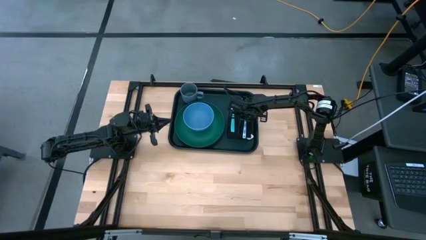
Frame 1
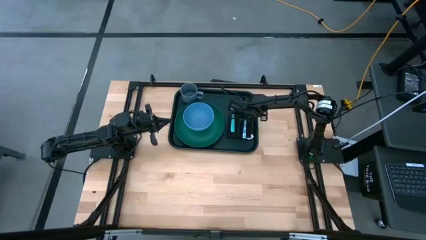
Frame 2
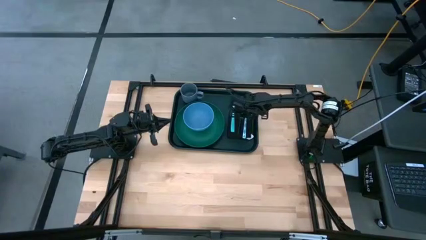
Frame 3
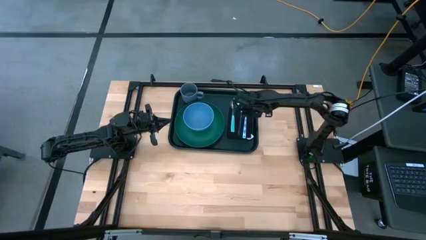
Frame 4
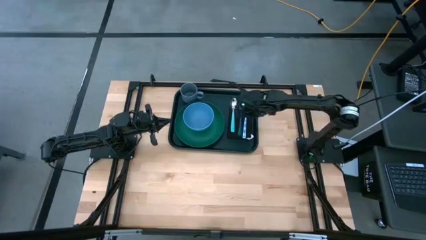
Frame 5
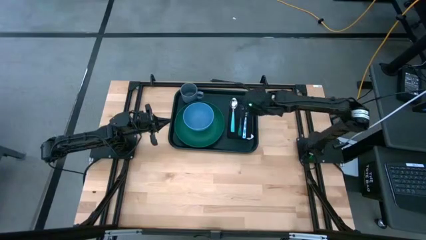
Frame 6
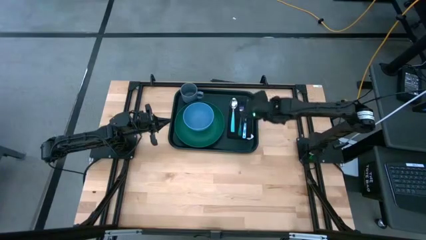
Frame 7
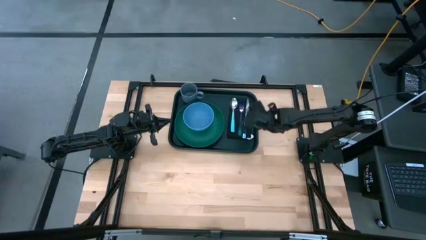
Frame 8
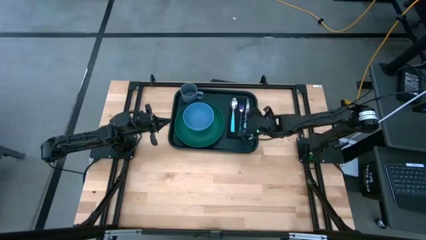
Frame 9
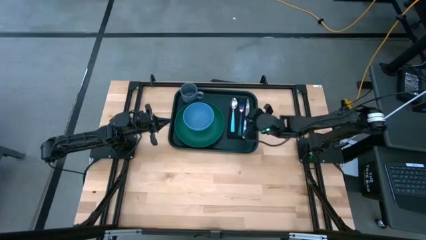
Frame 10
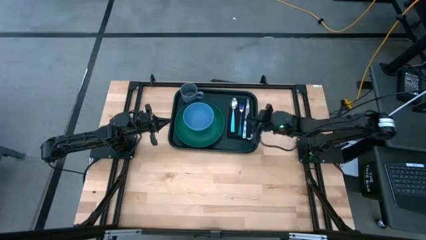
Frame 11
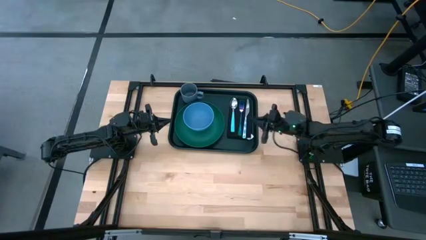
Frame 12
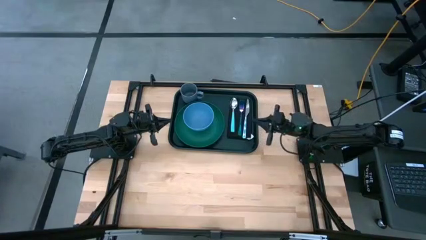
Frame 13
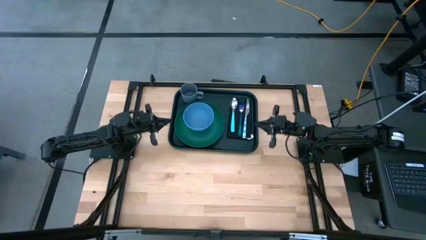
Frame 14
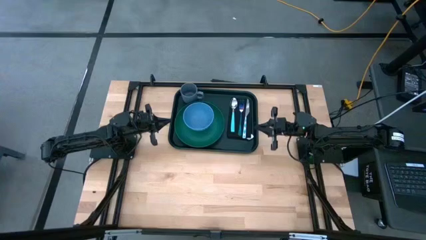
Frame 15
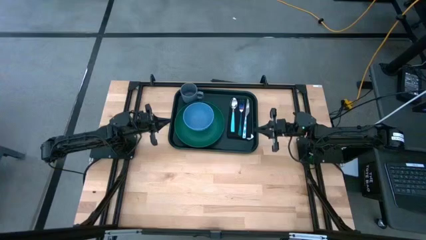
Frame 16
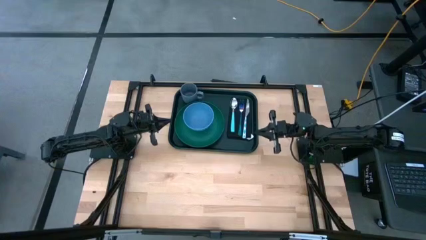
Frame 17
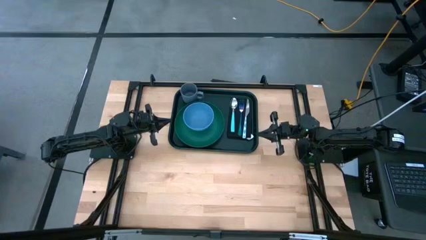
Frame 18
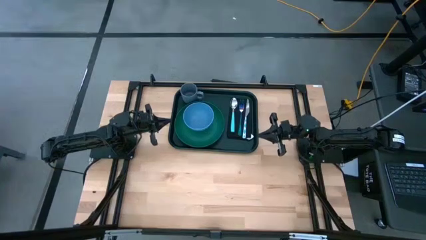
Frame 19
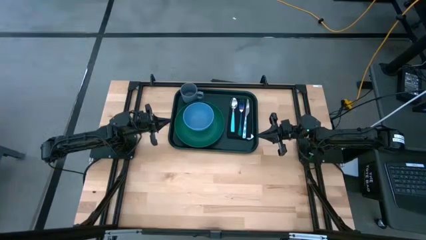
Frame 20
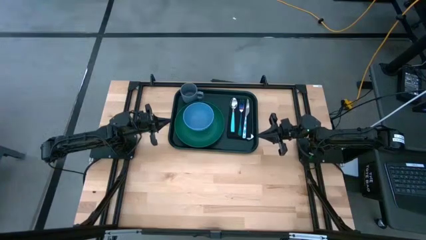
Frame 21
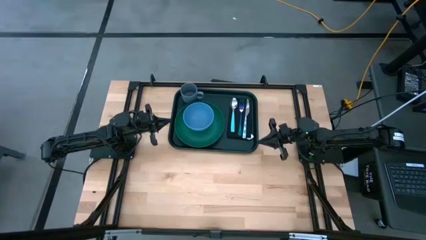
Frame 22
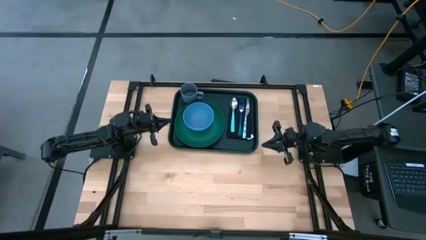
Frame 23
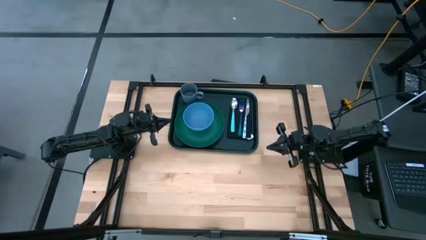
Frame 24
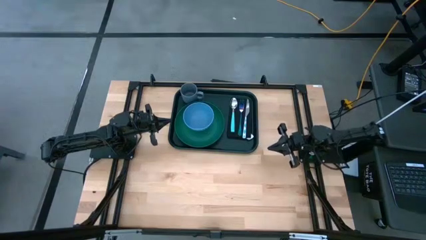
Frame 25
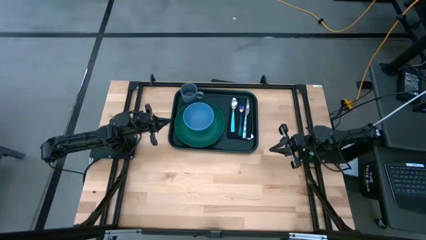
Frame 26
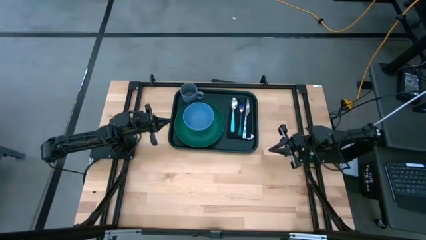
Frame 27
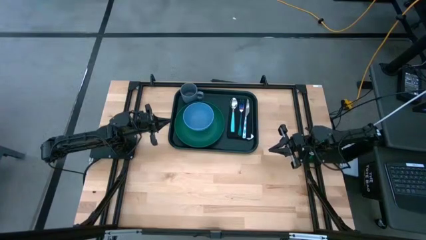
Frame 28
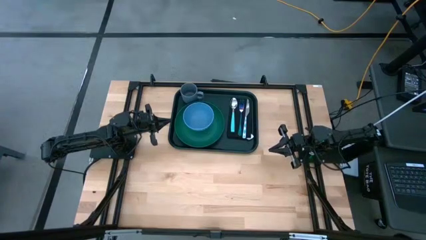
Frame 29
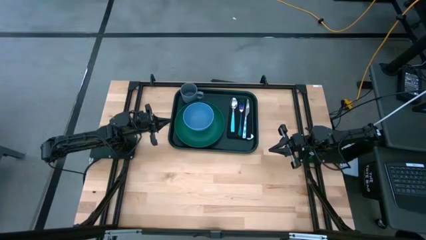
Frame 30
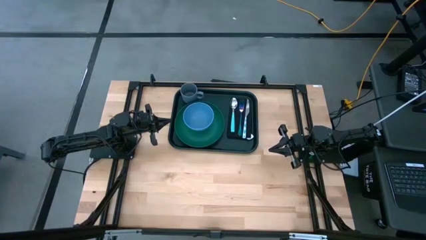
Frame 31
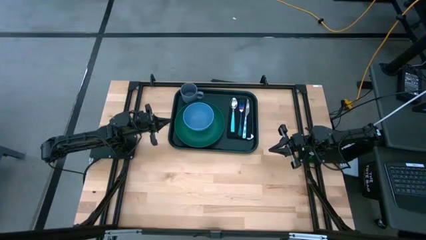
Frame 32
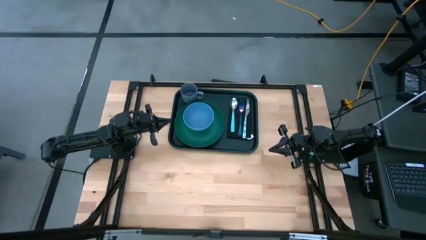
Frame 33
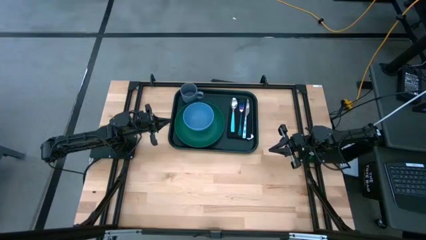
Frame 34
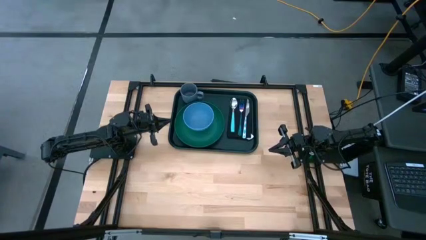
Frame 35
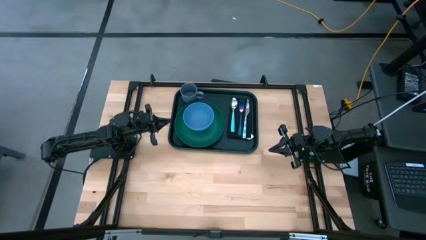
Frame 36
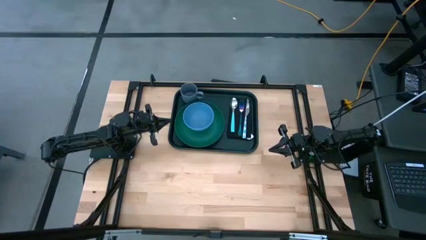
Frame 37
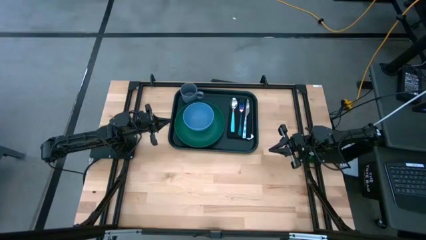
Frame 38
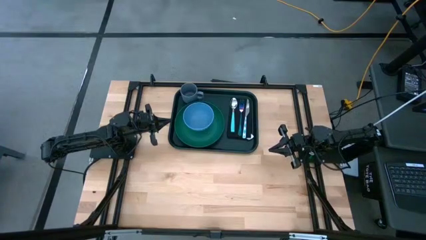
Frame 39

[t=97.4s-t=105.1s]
Task: Set up tray
Return to Home Position

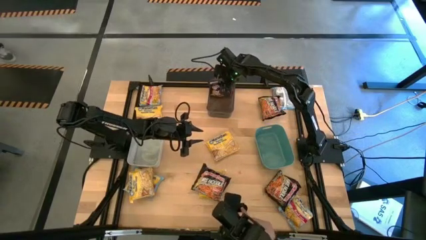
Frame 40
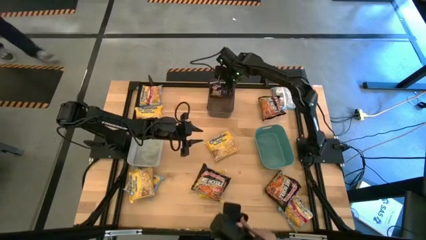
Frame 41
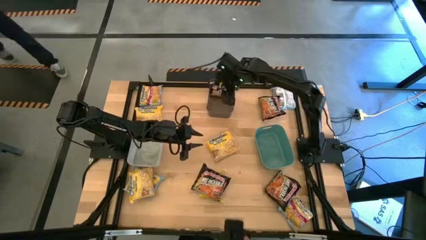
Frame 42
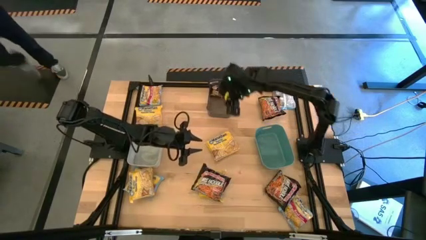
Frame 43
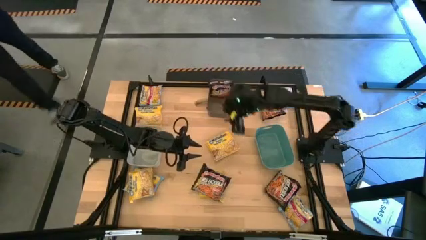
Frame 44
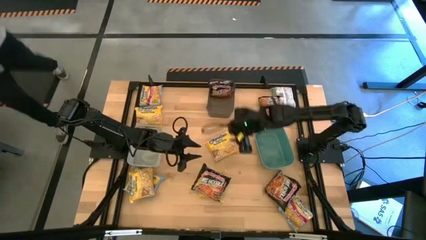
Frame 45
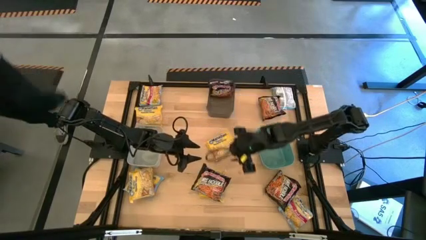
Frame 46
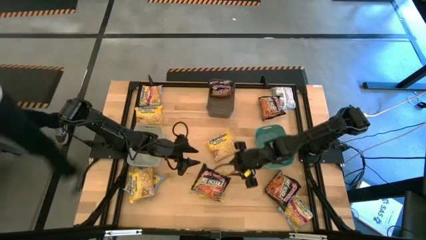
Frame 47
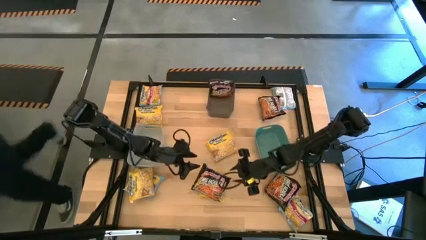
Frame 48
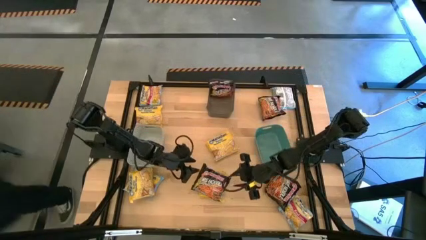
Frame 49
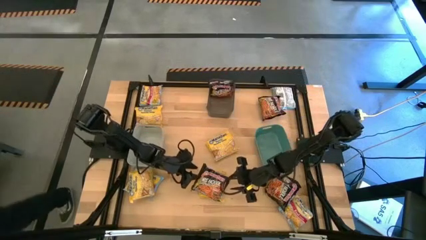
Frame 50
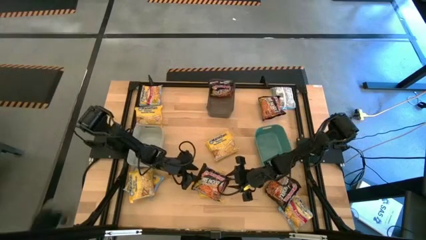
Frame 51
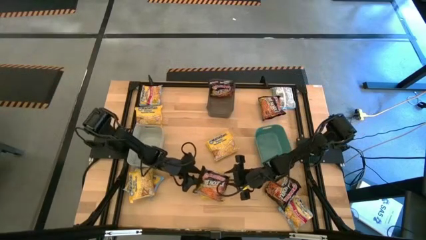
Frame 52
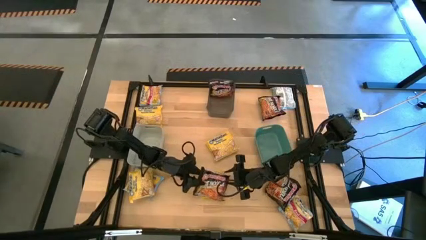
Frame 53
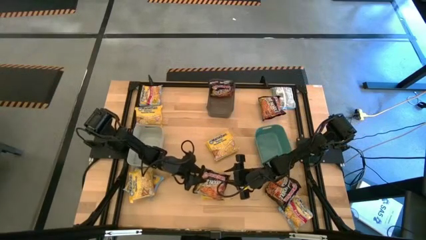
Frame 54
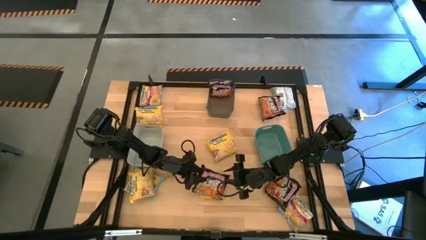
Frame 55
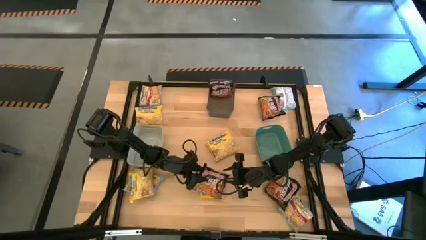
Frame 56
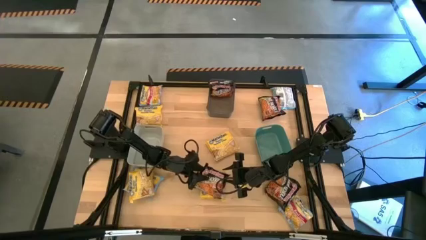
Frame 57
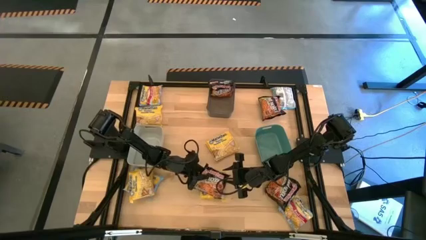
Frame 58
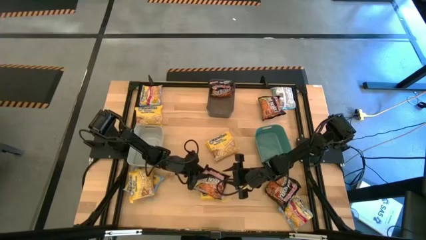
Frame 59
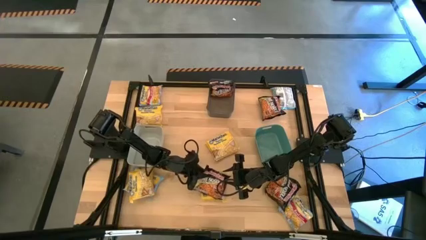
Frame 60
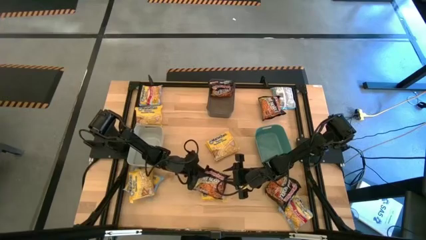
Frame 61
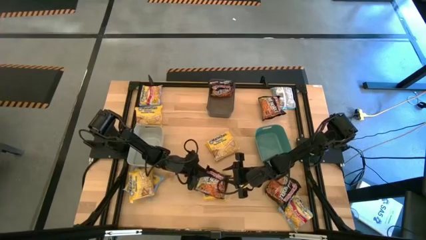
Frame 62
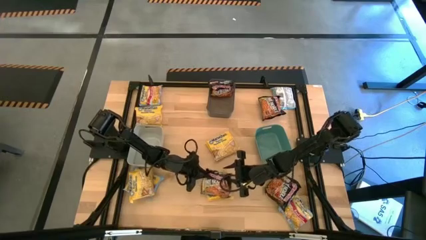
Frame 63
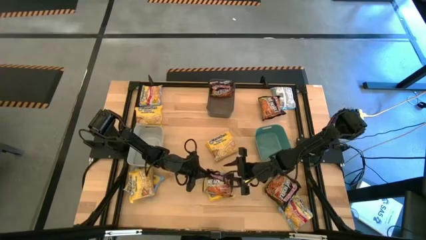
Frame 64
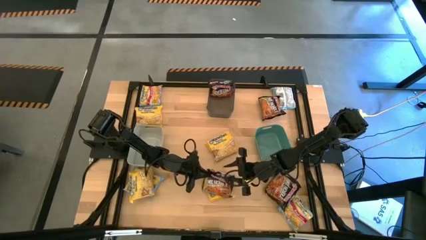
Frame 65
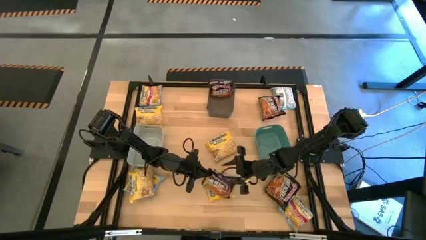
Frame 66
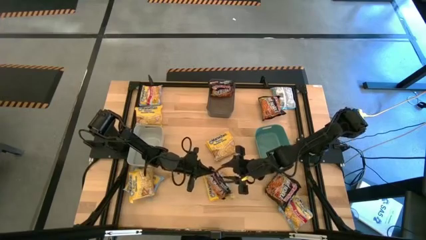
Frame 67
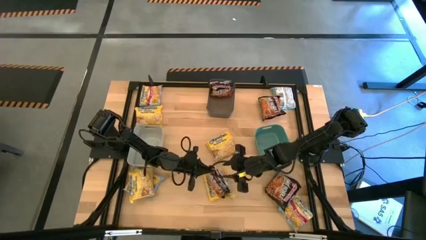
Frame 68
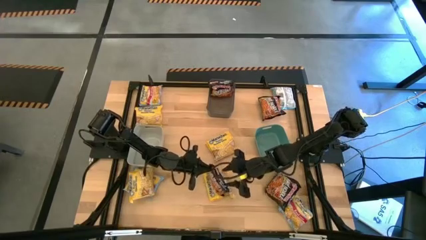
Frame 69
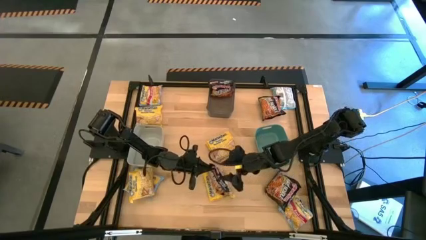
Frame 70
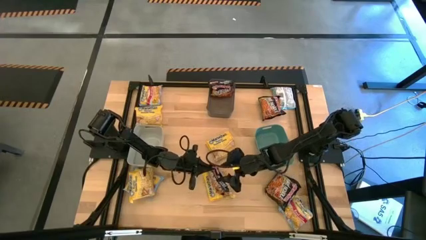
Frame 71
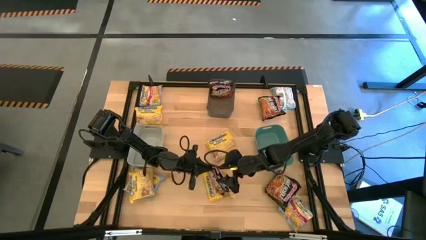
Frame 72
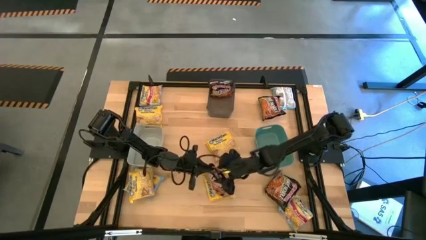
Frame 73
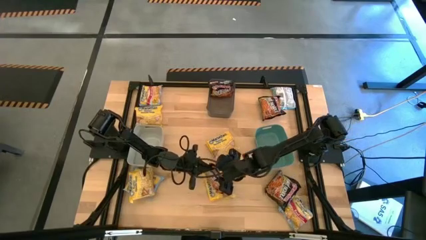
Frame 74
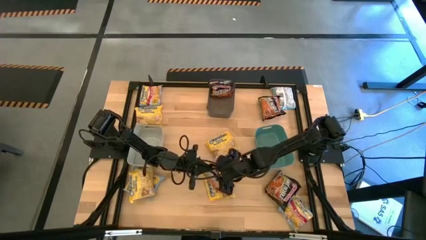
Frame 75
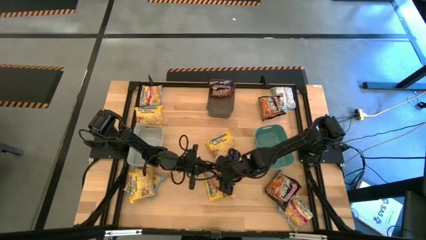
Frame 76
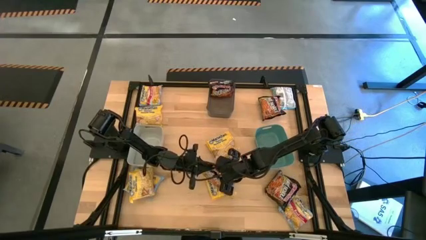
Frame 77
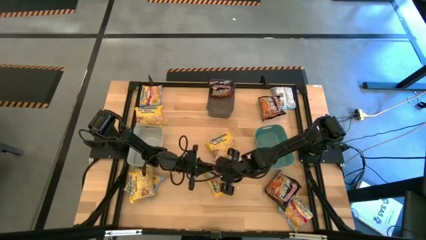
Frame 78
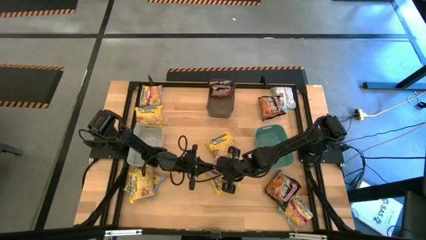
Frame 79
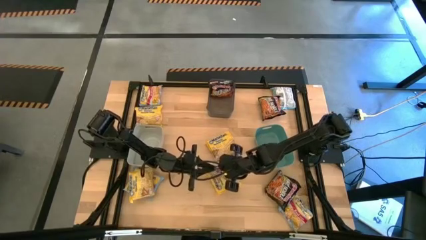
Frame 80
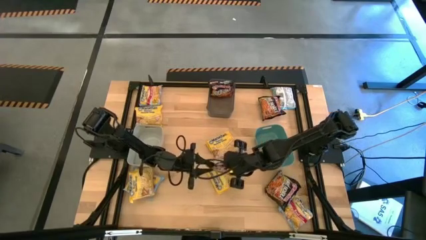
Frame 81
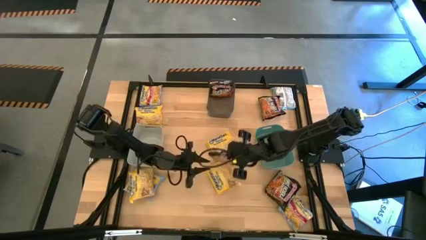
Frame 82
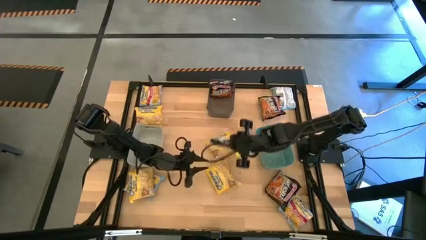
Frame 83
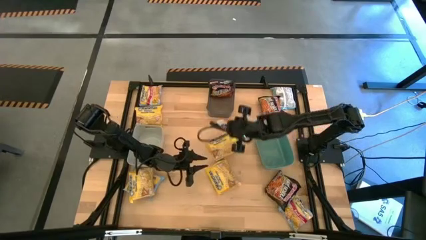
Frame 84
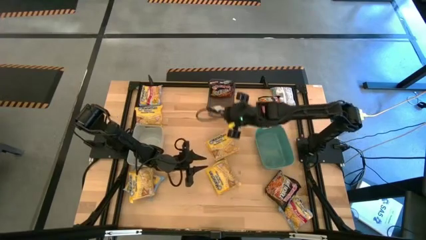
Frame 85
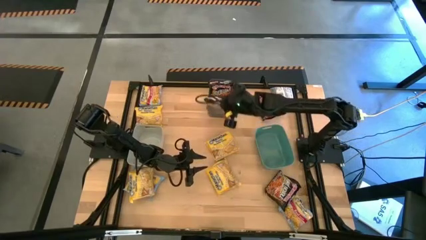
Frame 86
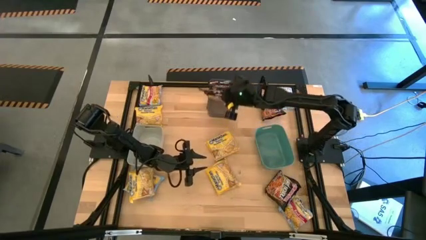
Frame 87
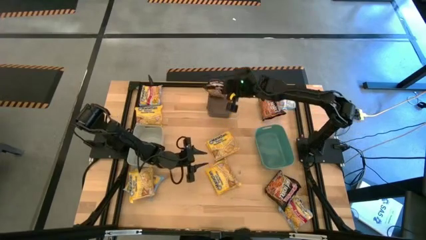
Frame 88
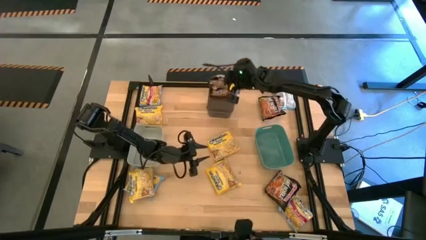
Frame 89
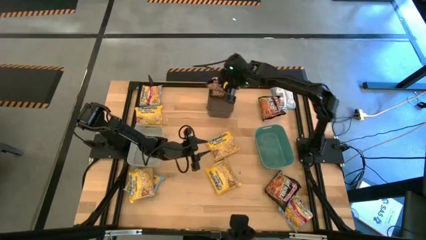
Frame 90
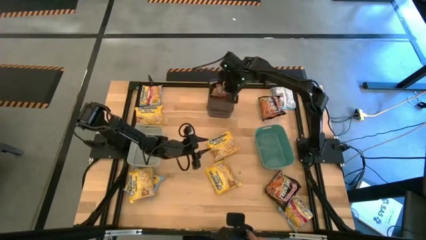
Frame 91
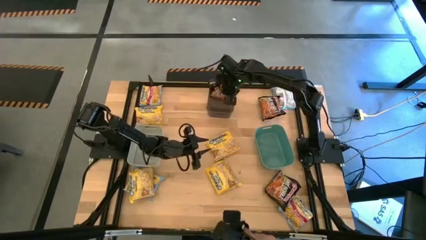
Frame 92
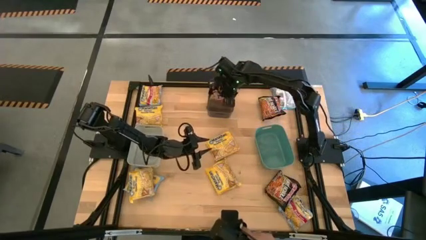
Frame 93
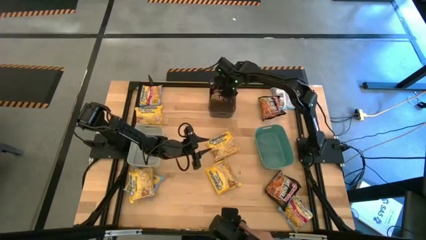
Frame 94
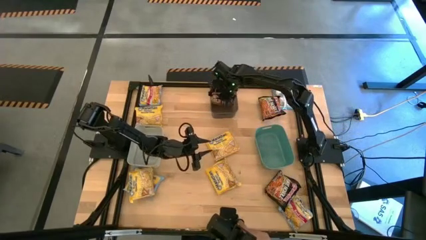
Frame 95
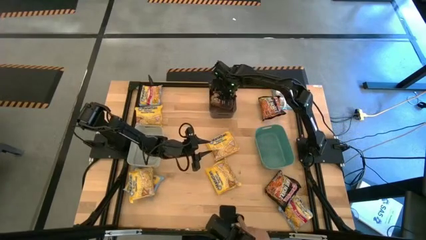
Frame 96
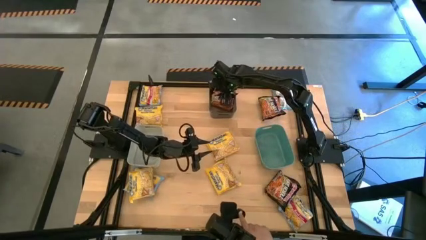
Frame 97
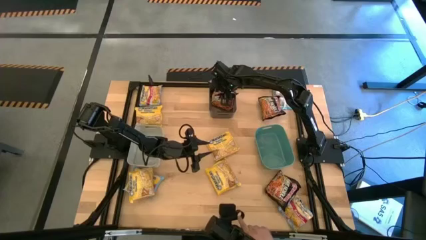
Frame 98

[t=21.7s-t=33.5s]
Task: Sort Maruchan noodles
Put the black noodle pack into the black bin
